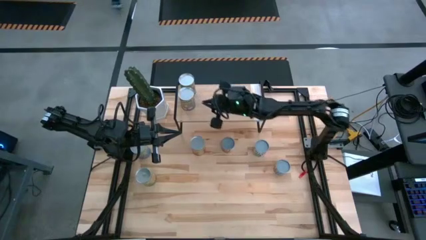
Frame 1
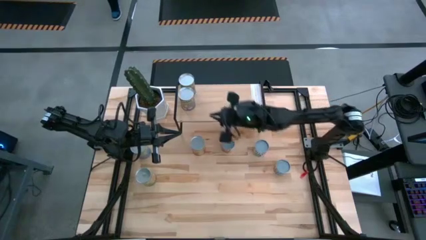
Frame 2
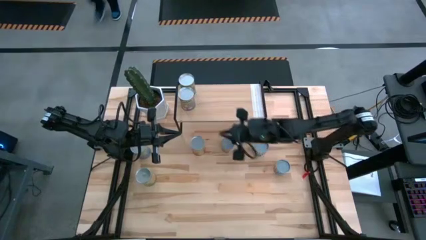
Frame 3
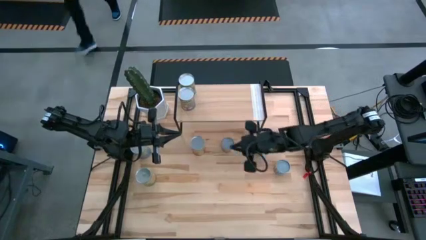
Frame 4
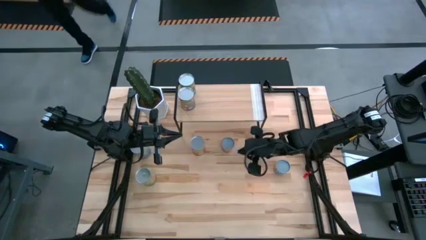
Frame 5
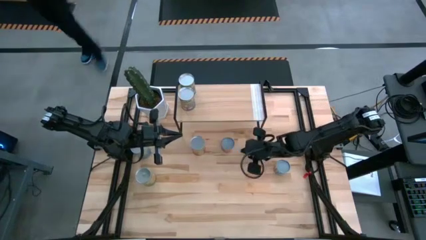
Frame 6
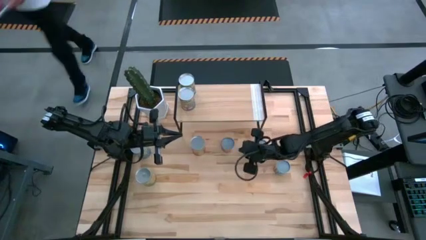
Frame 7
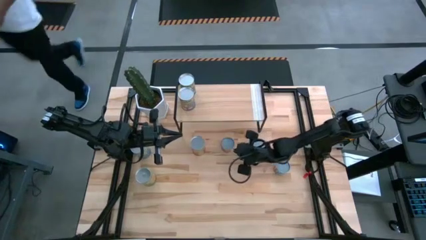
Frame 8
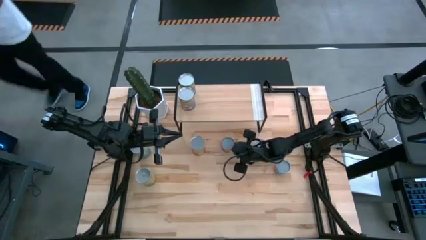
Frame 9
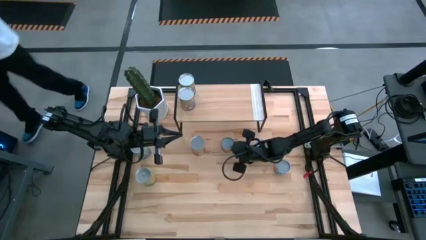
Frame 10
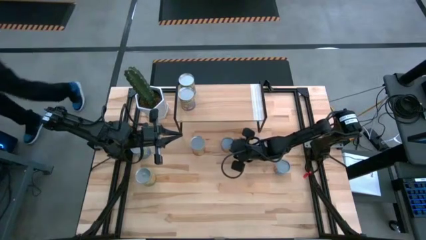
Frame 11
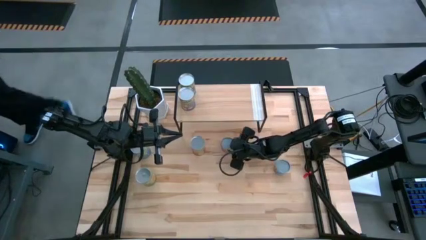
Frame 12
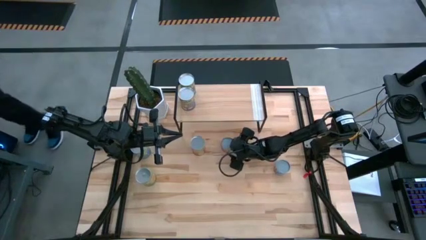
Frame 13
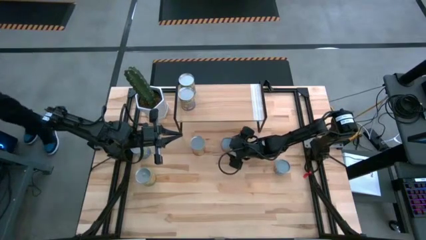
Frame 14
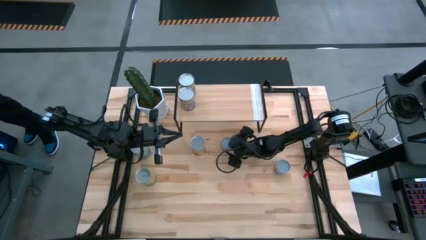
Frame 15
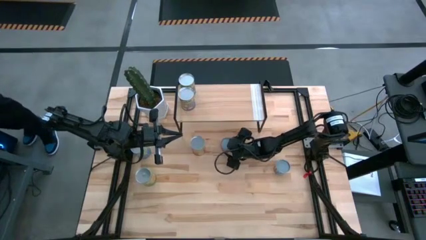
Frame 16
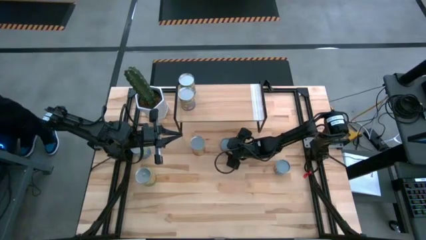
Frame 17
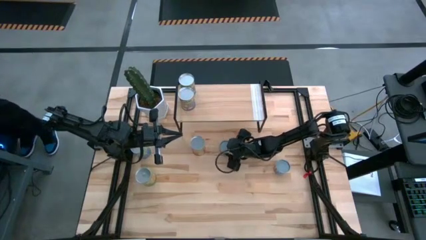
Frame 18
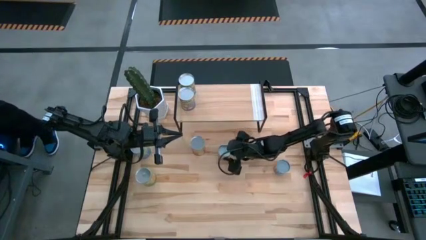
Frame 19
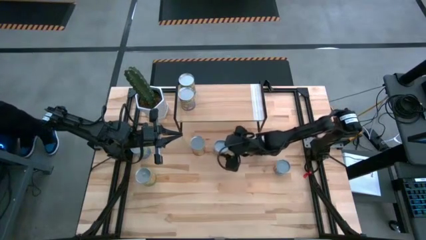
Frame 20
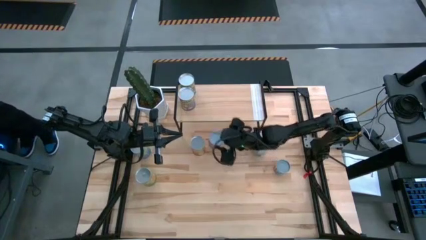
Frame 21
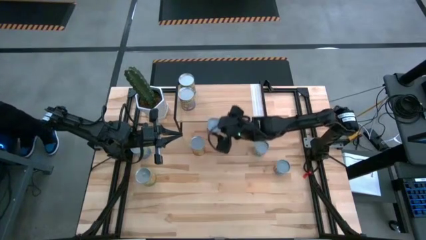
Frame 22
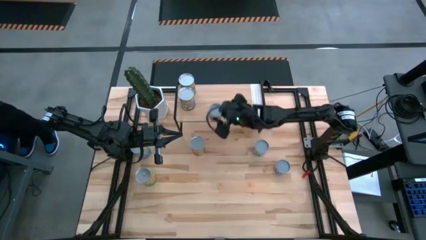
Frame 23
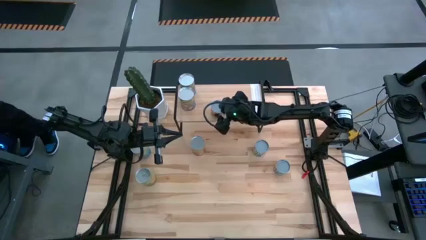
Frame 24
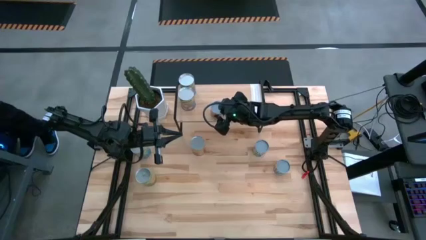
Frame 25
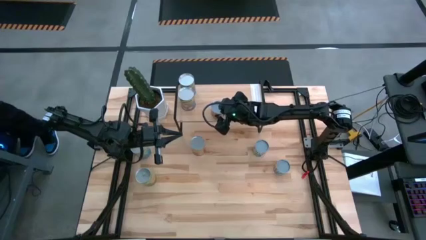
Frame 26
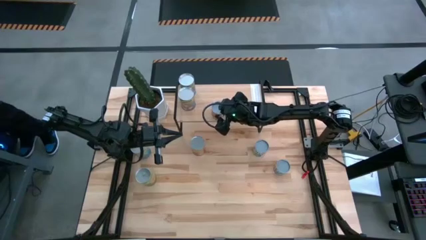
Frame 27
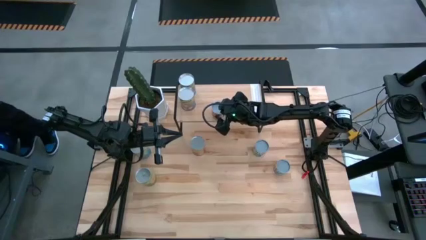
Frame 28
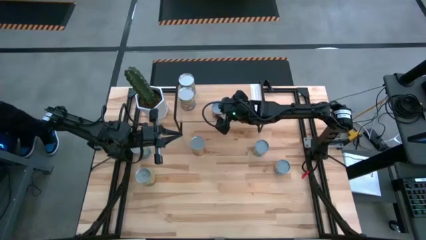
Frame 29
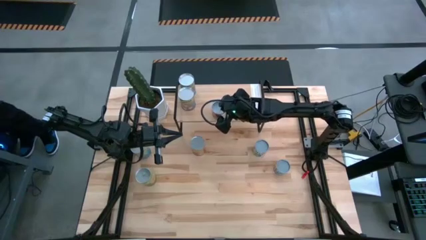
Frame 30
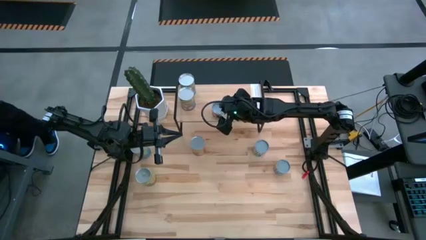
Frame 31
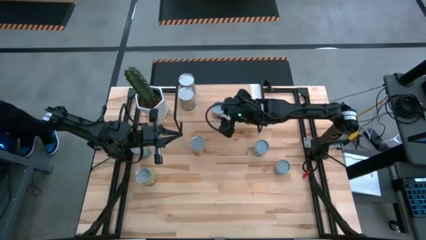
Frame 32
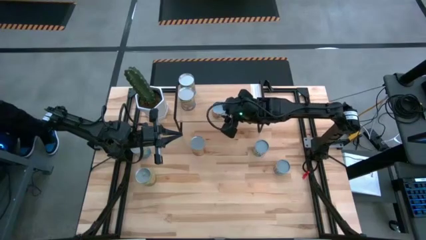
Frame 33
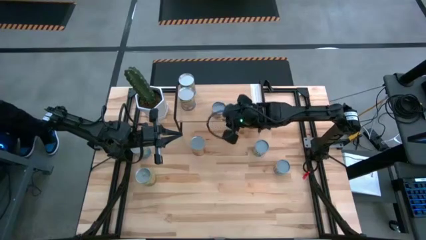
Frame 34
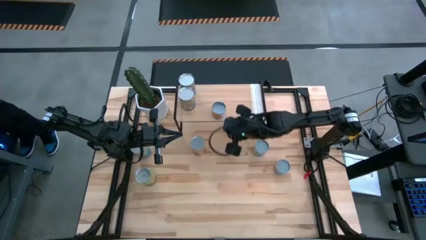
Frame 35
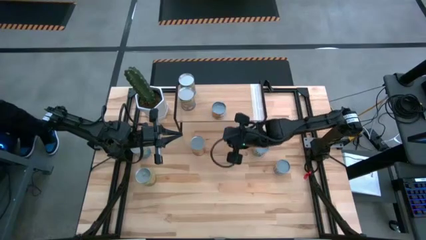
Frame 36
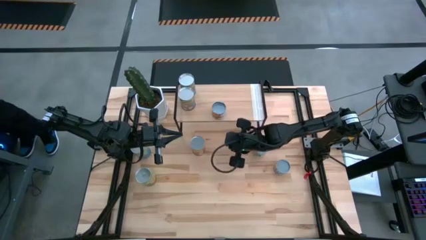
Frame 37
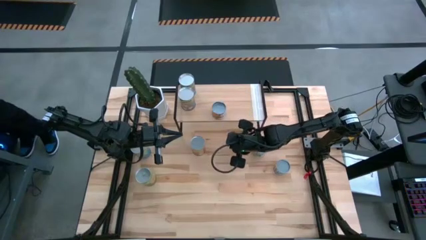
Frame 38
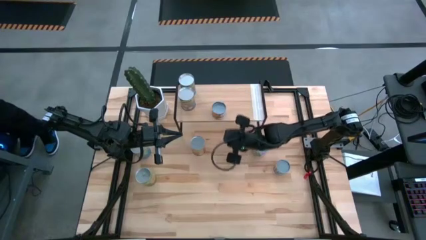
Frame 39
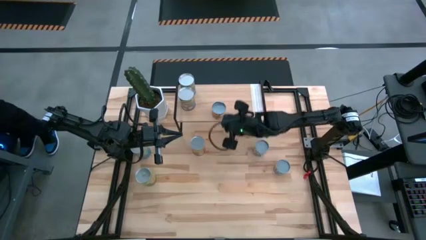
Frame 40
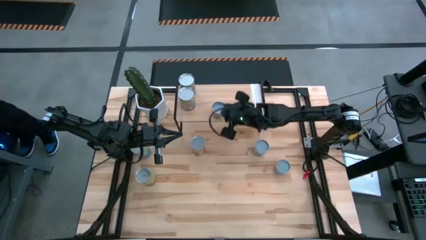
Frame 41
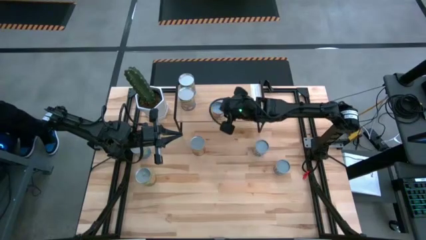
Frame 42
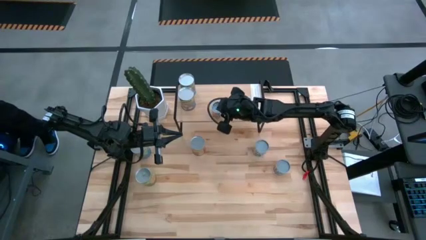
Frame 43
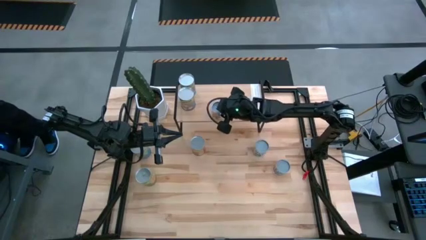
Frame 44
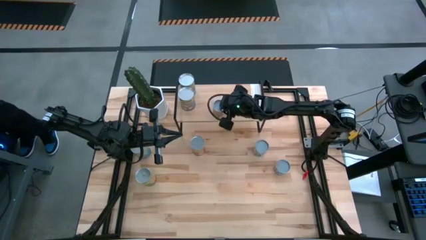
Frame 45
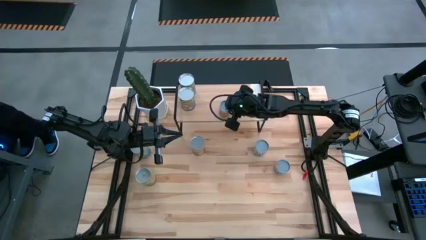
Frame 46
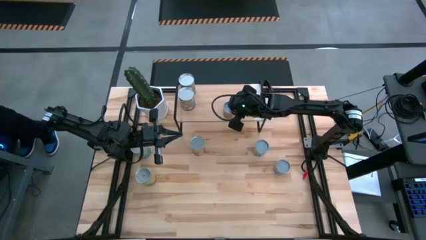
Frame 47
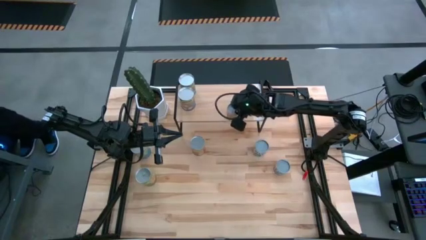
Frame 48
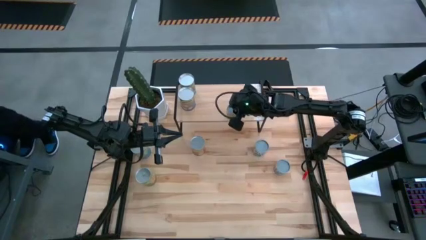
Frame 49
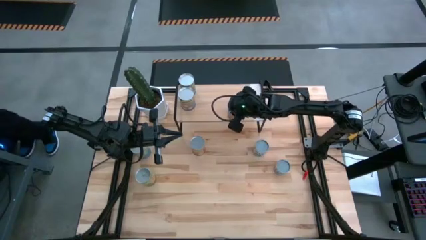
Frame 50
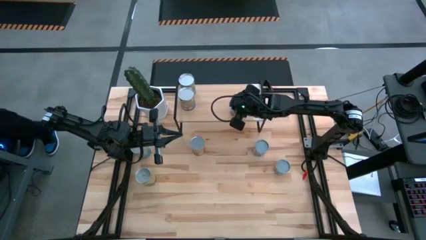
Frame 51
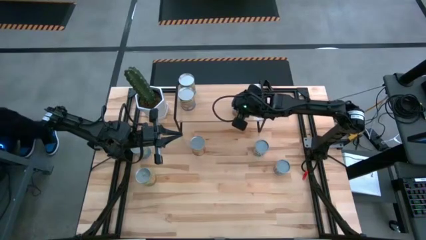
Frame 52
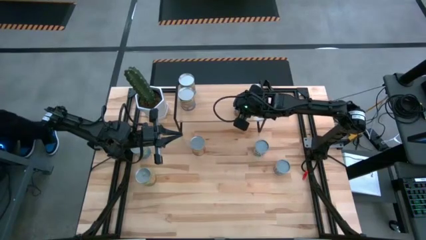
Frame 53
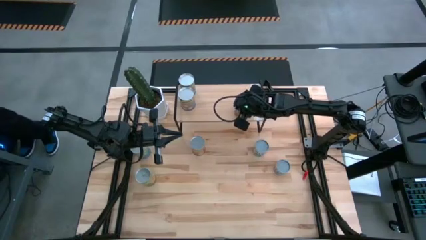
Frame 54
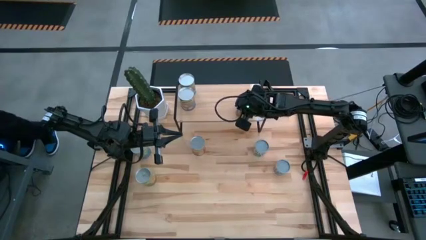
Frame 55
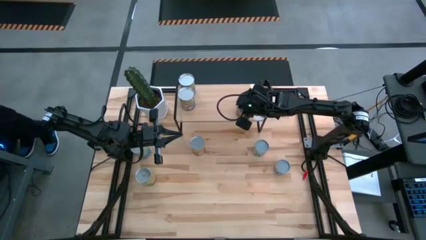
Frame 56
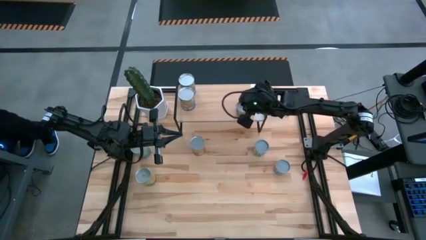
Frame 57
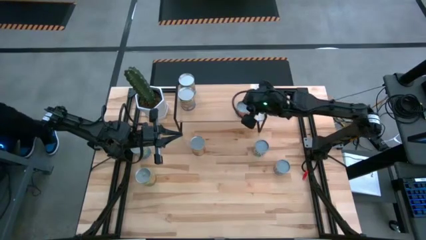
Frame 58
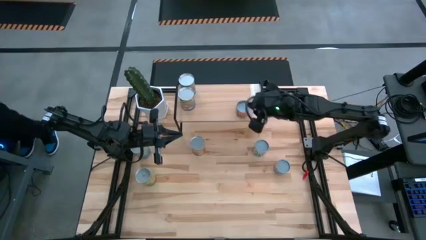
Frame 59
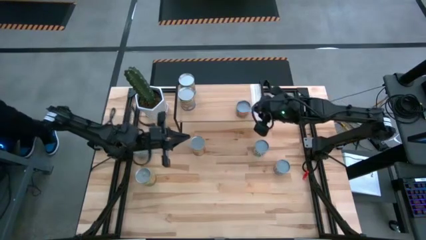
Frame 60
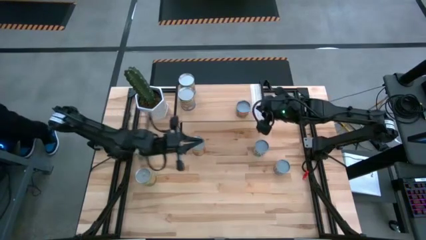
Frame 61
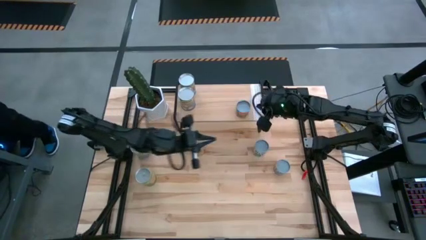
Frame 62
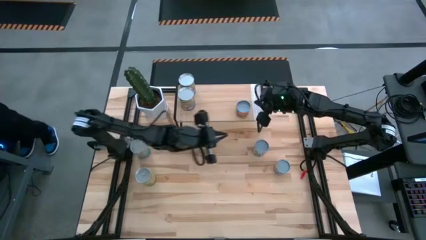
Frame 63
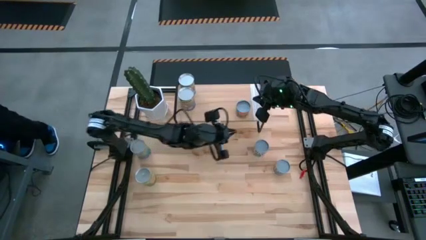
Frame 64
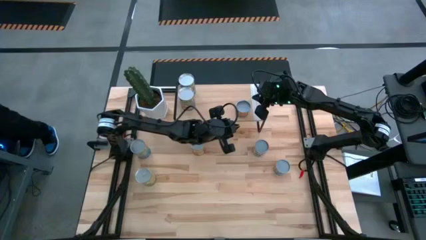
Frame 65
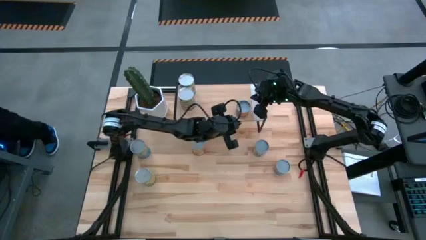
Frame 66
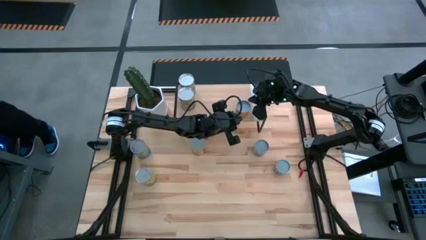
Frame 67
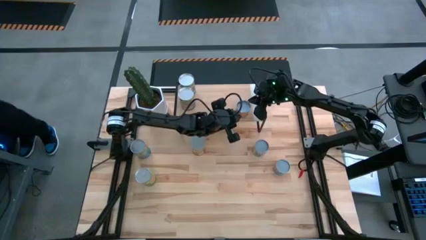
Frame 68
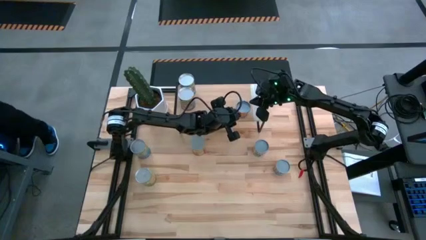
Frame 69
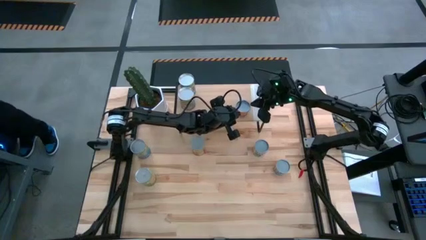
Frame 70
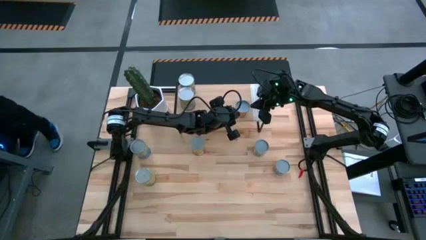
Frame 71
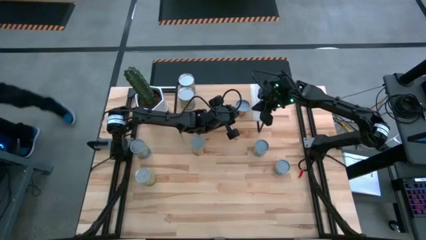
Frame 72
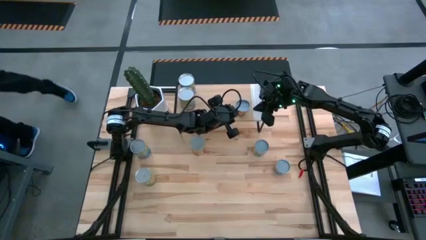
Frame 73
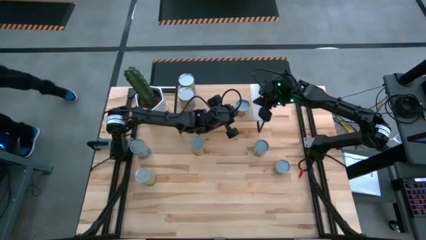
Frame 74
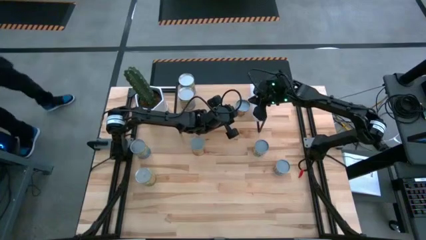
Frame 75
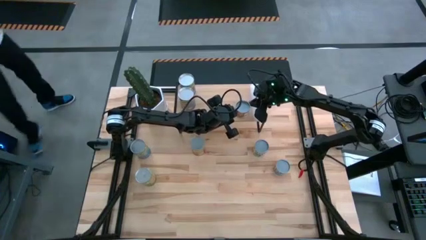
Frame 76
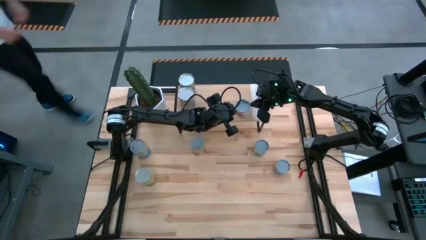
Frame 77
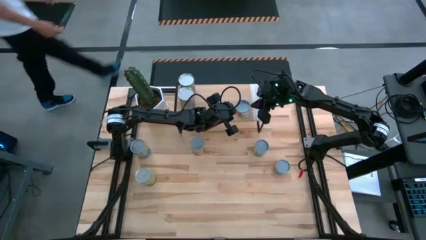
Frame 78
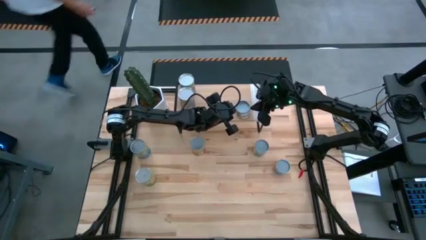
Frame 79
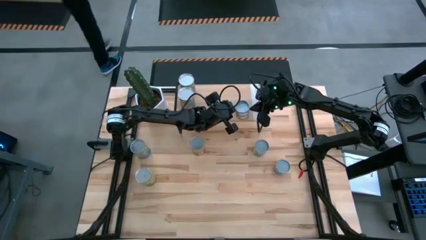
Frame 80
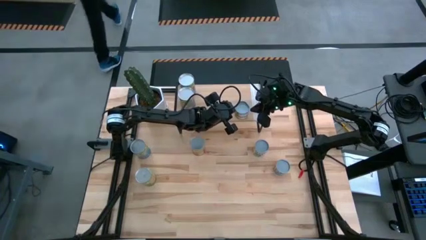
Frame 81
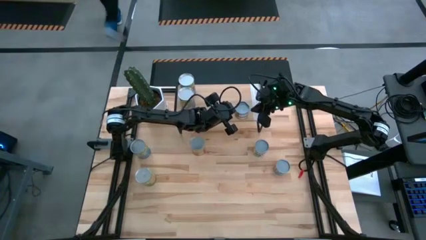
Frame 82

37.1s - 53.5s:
Task: Pick and place cans onto a shelf
Put the small canned oranges on the shelf
